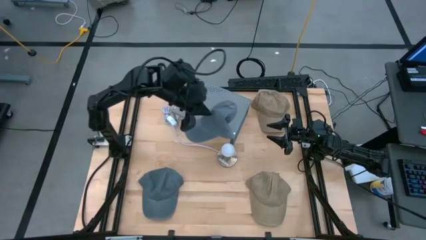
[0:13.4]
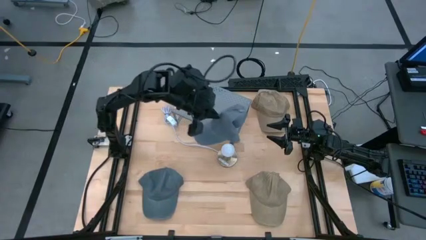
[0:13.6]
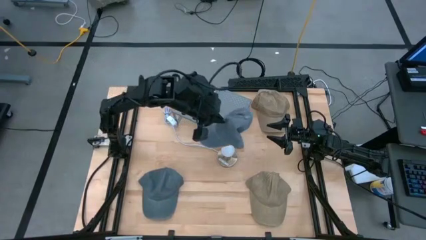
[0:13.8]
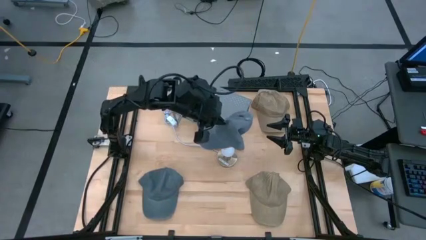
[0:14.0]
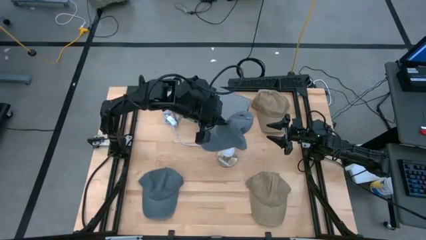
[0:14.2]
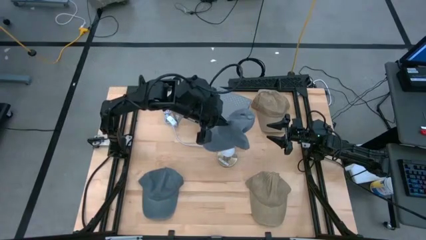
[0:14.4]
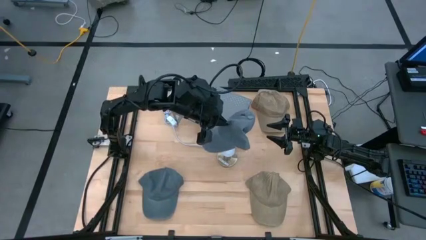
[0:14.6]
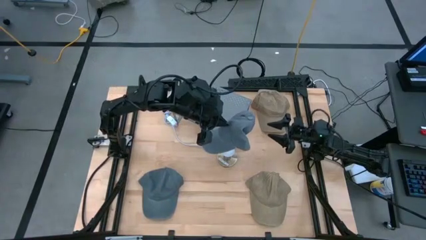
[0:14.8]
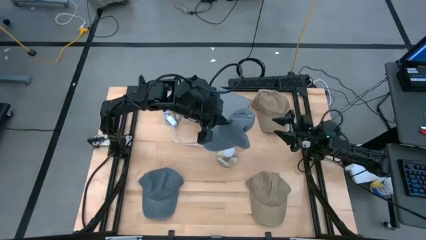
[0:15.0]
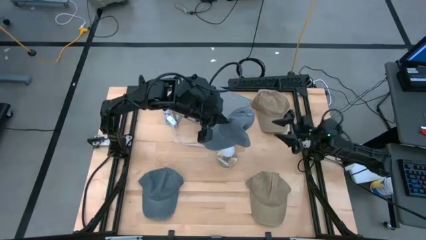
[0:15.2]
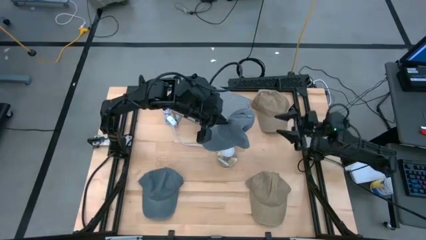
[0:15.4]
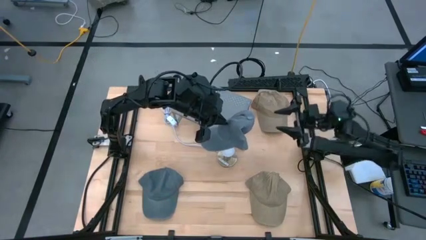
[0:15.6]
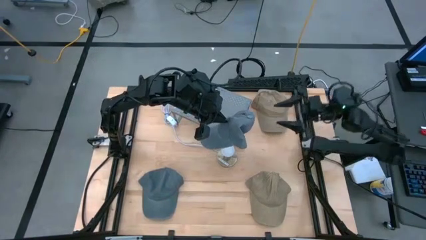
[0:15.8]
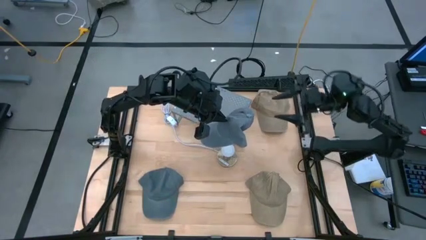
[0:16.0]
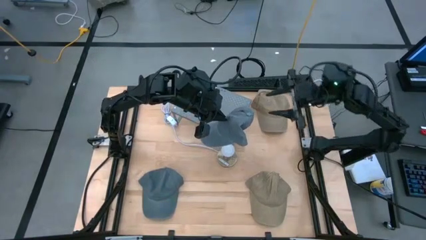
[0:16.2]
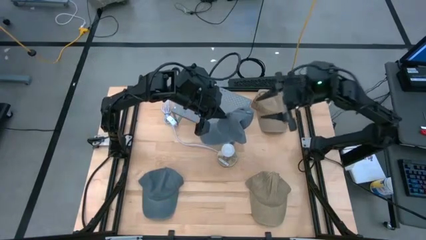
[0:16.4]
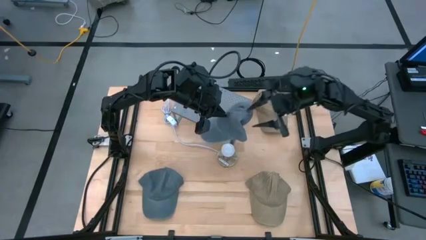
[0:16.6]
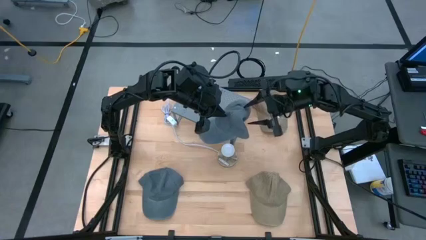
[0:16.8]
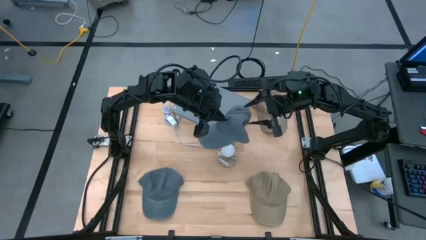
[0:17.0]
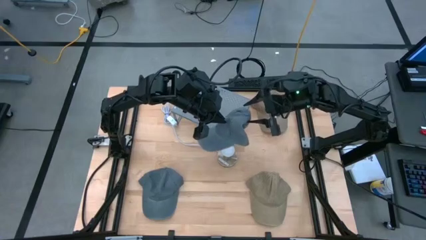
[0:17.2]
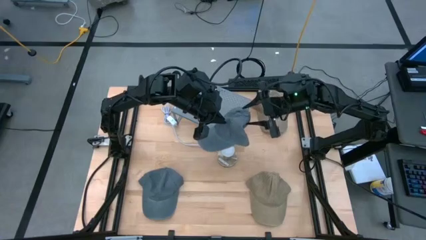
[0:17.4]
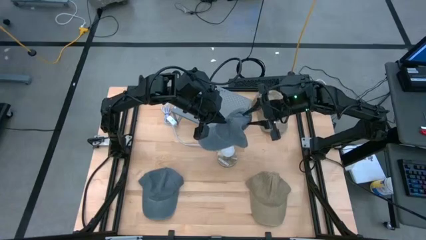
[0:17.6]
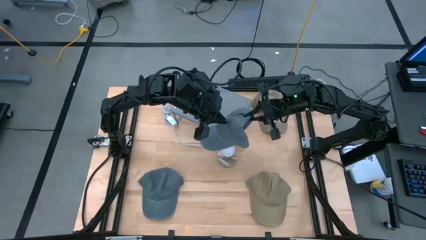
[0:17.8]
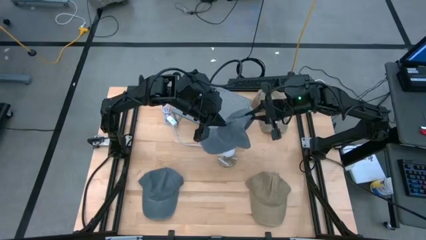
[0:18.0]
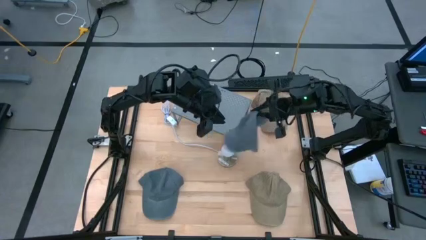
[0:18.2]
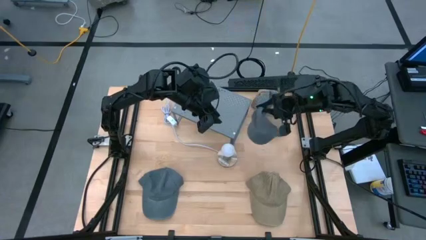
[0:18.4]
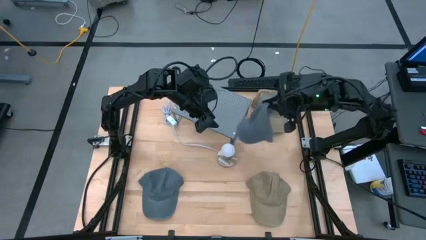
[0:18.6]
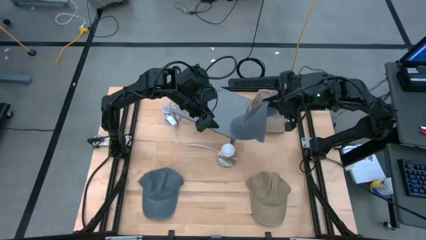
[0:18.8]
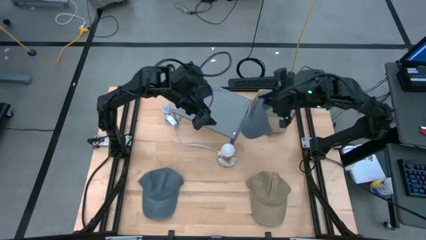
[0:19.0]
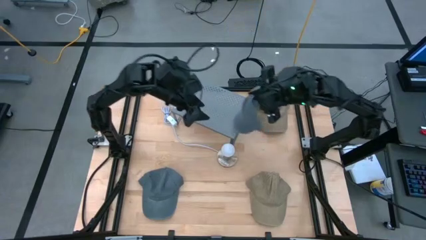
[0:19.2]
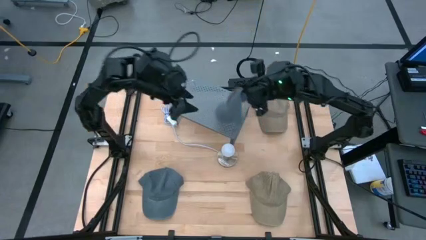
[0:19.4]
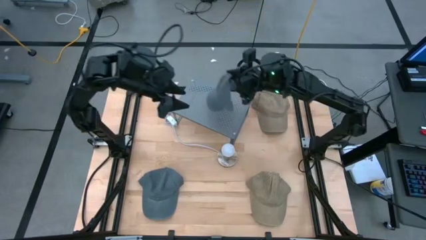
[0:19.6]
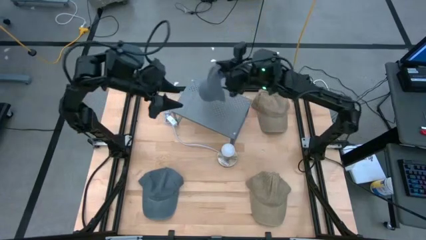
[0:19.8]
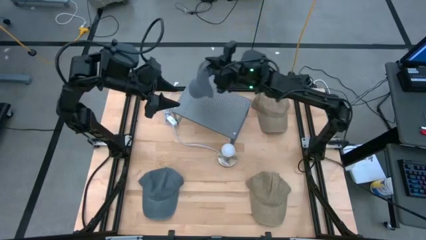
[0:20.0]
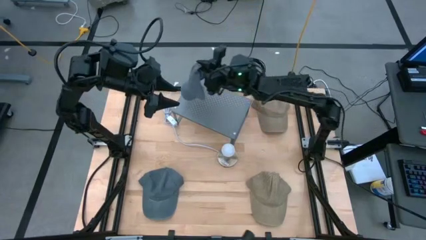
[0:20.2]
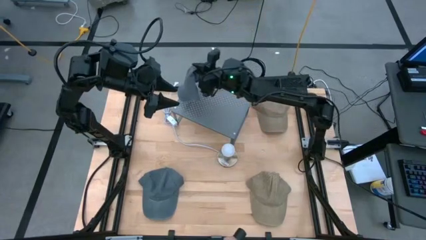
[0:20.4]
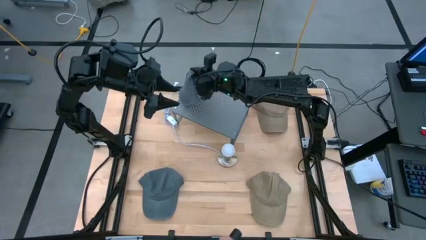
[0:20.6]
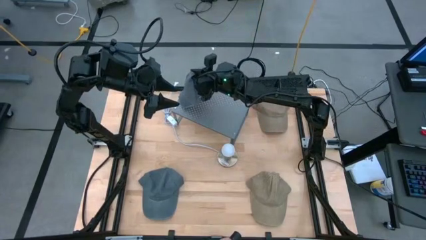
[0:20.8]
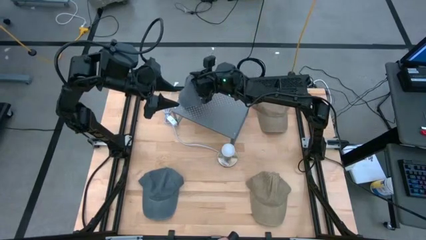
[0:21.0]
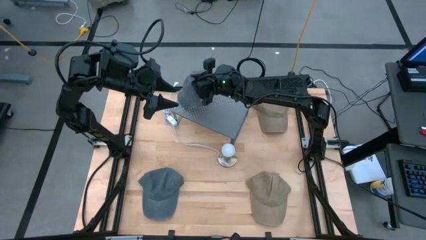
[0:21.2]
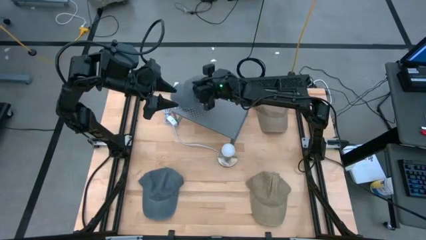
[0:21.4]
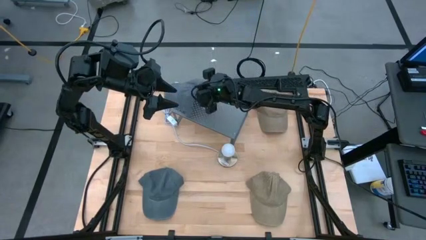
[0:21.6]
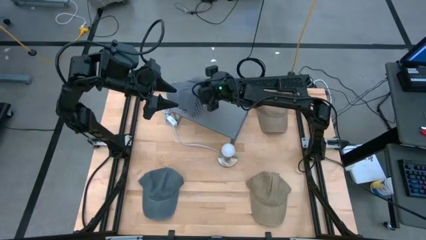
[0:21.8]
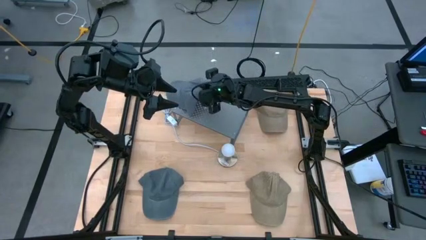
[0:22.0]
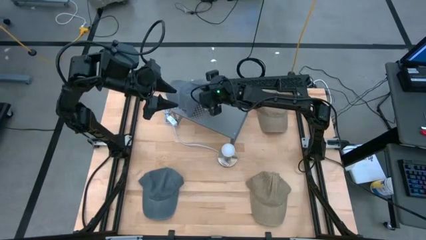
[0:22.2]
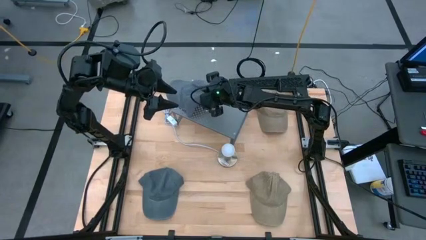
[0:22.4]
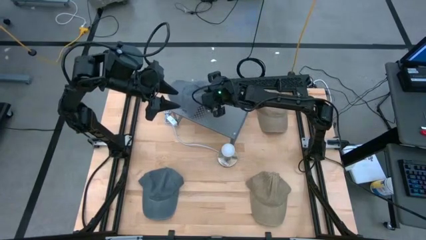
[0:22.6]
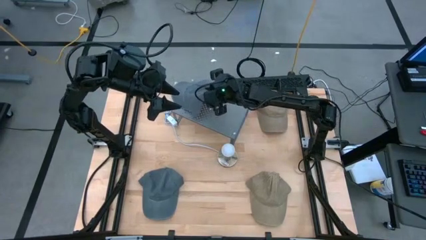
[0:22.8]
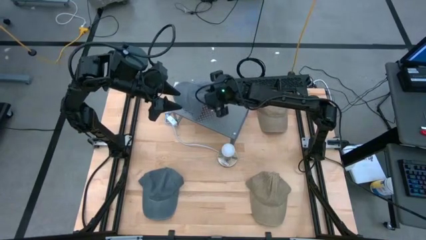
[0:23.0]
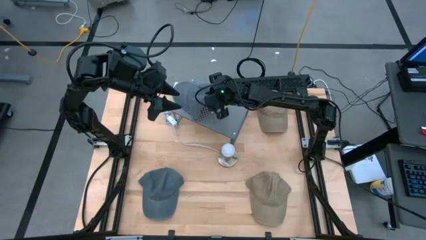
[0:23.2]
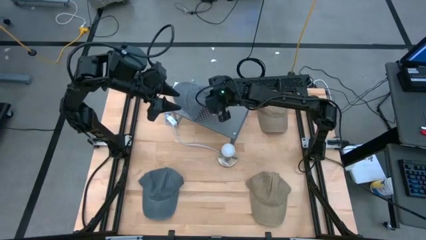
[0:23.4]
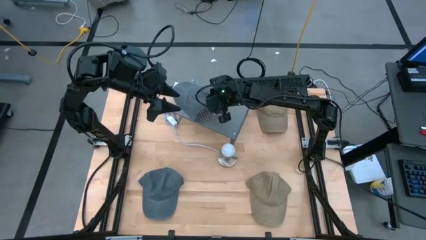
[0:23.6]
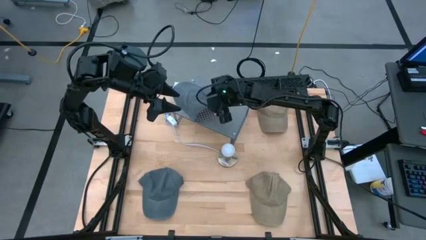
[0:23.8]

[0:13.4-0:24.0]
Task: Pick & Place hat
Put the top gray cap on the shelf

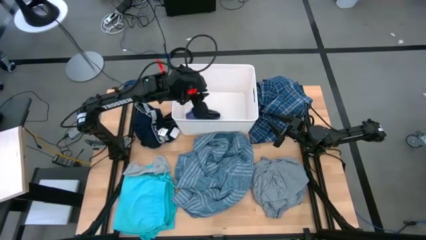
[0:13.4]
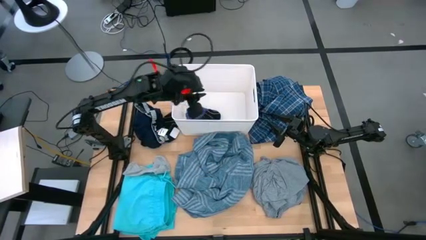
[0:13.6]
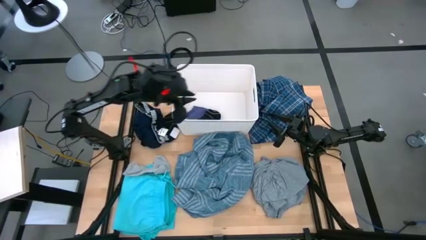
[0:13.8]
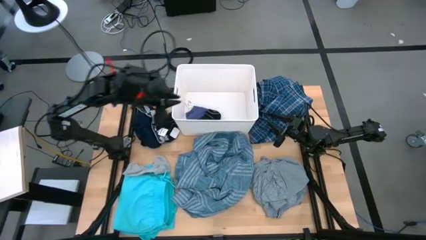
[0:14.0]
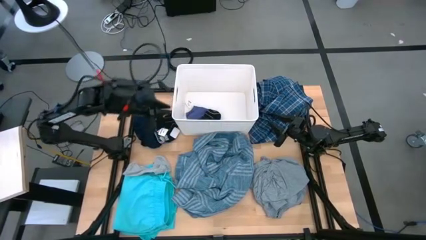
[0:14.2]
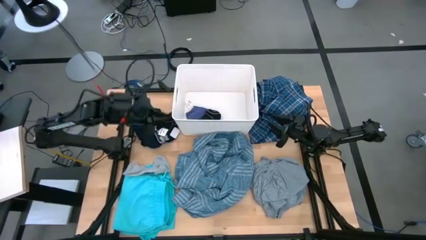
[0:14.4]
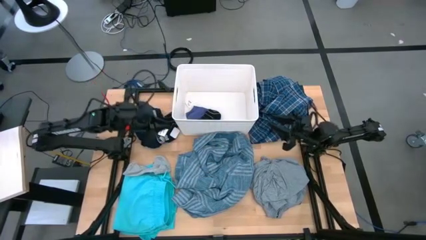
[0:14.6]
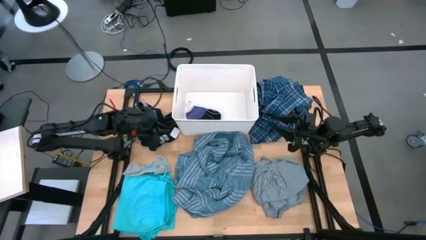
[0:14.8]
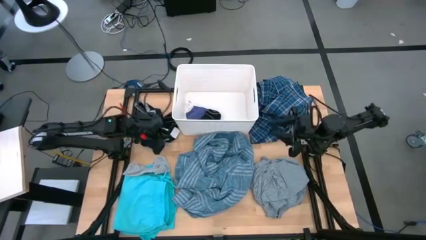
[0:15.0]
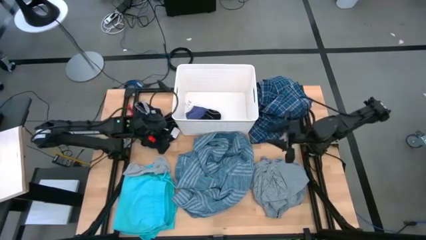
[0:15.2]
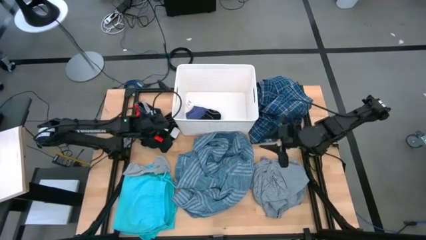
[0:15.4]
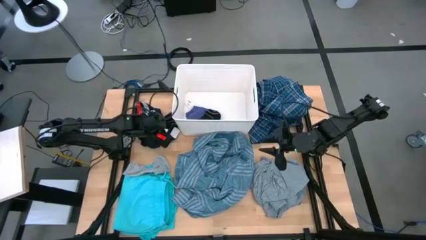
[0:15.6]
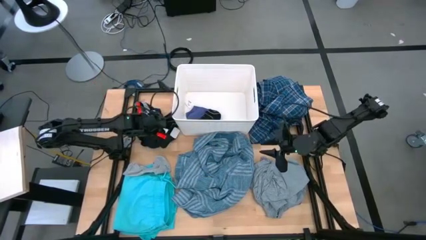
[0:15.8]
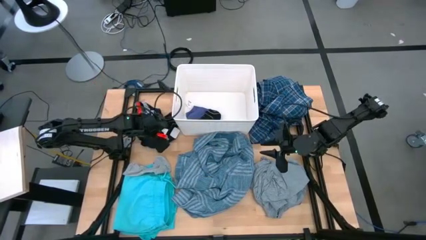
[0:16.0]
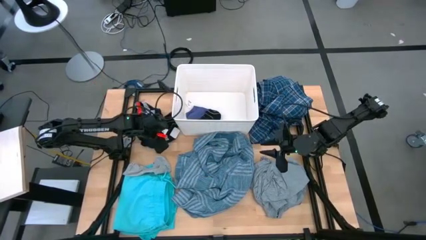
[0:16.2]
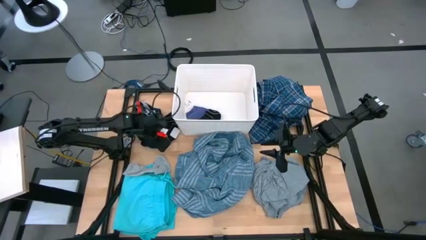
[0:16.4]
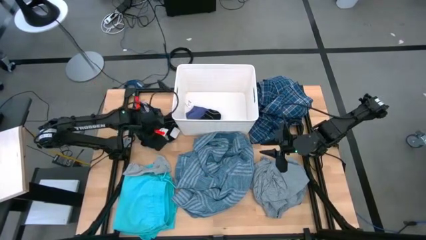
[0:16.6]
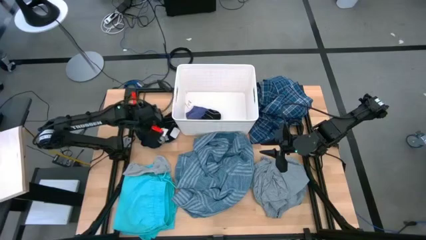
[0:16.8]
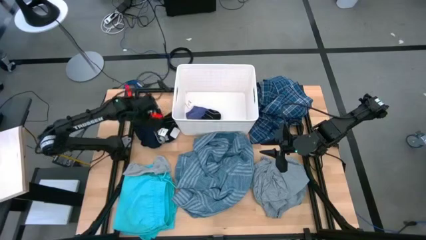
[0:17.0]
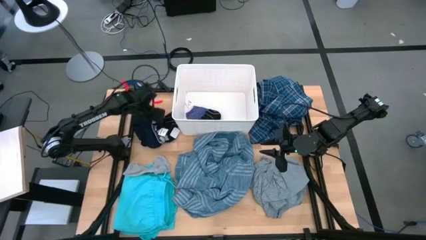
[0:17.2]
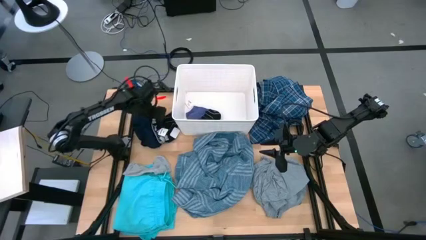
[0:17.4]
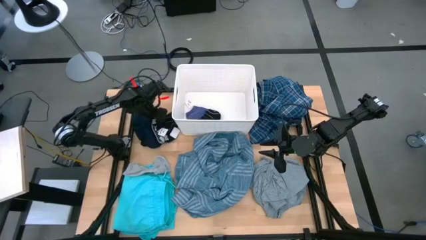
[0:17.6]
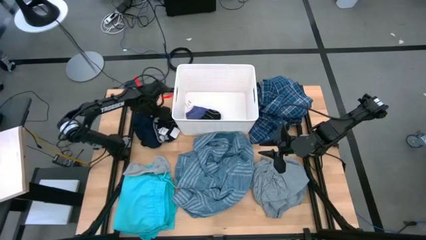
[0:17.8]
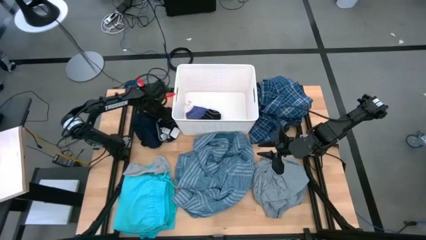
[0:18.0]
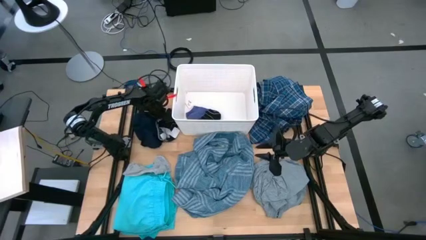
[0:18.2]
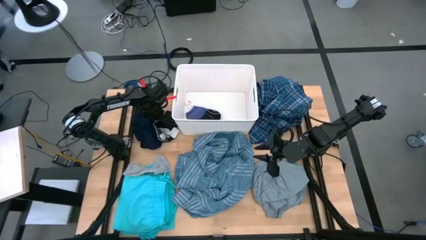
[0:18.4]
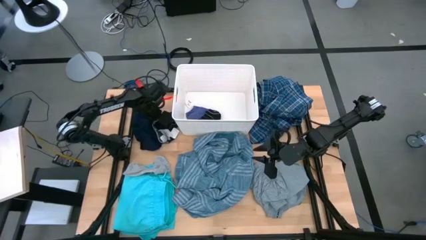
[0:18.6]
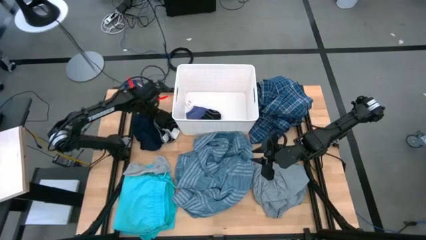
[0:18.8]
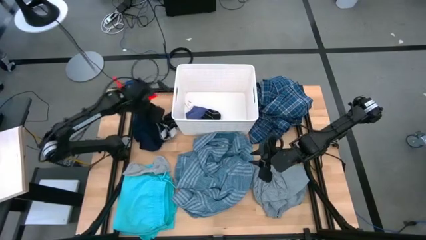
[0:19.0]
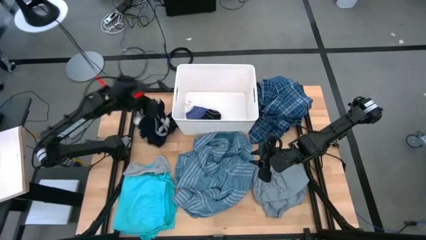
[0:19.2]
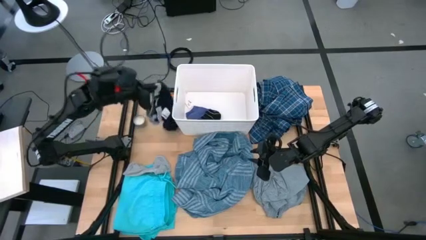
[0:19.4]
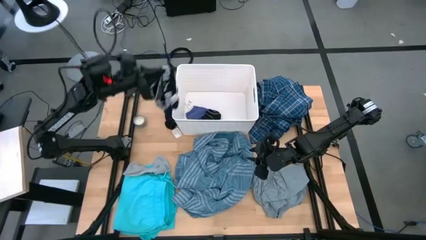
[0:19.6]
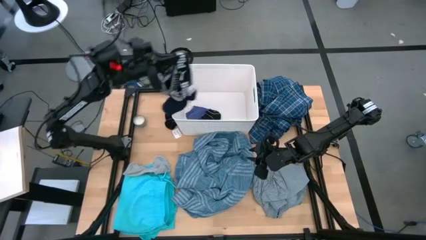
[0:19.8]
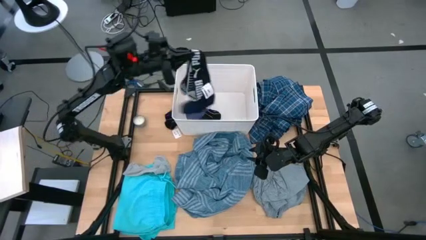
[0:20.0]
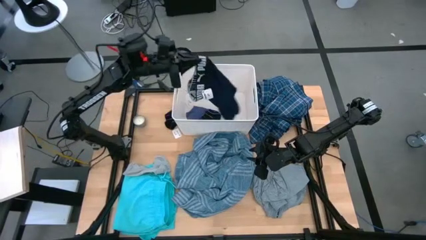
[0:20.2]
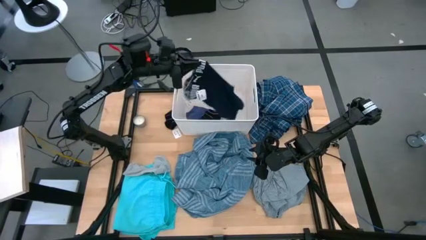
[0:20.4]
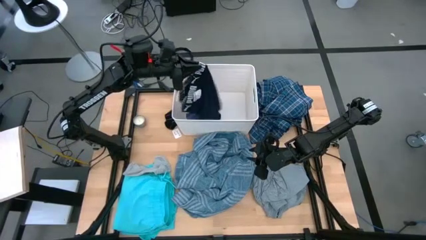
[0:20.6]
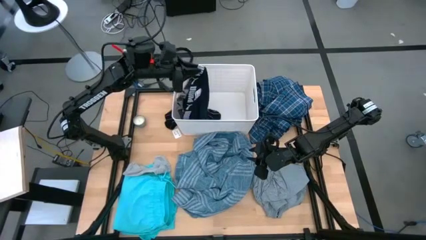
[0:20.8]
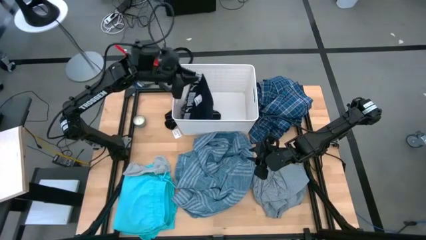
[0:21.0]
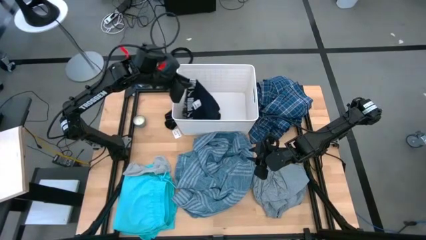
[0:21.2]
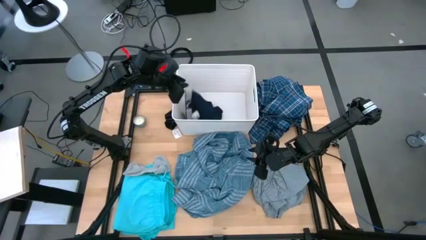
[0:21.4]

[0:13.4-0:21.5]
Task: Sort clothes
Put the black boxer shorts into the white laundry bin
